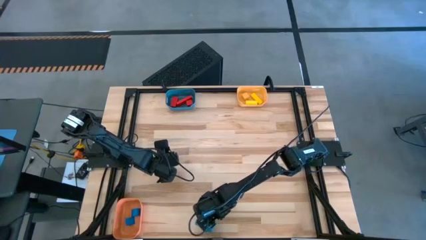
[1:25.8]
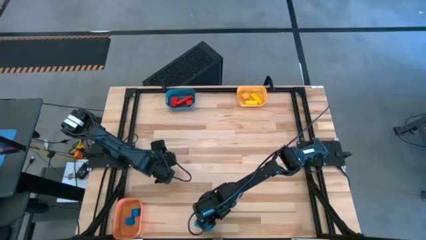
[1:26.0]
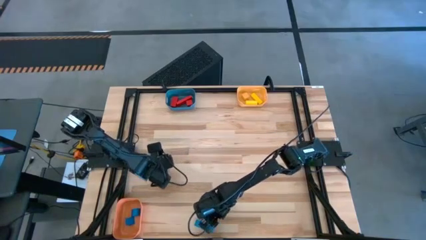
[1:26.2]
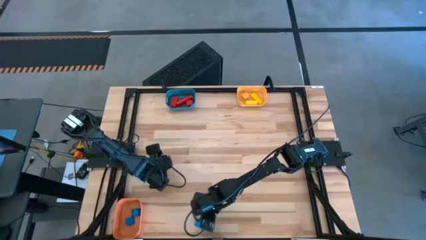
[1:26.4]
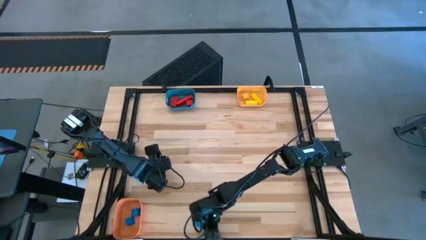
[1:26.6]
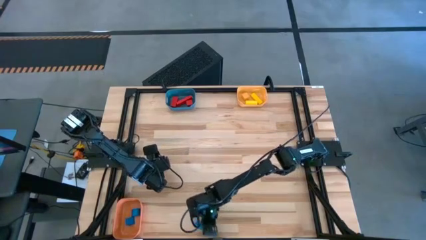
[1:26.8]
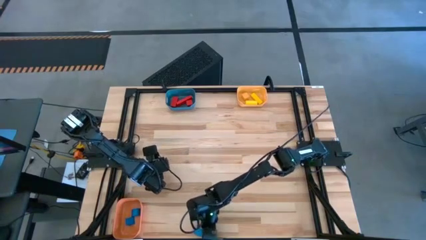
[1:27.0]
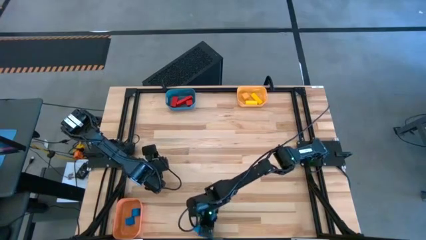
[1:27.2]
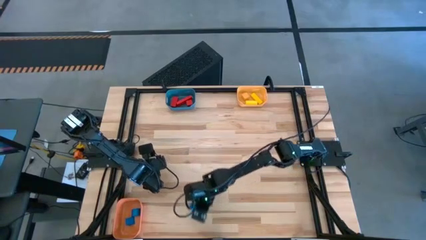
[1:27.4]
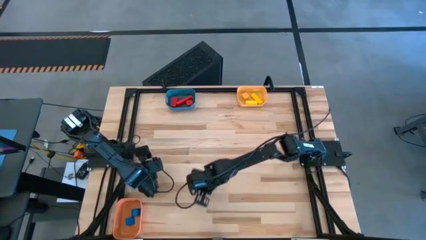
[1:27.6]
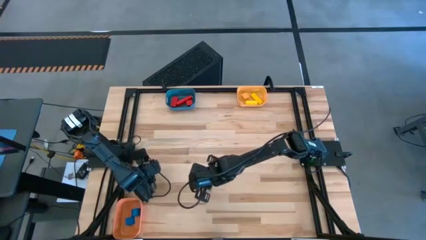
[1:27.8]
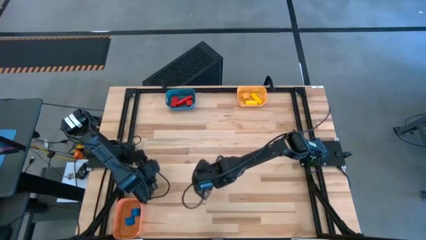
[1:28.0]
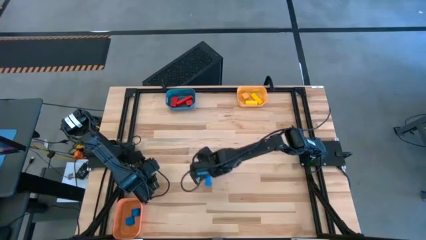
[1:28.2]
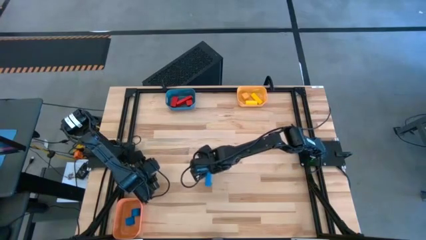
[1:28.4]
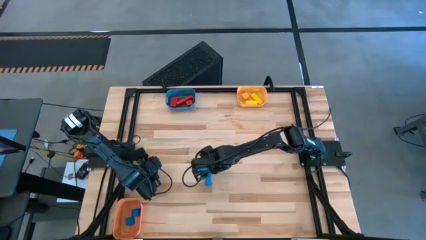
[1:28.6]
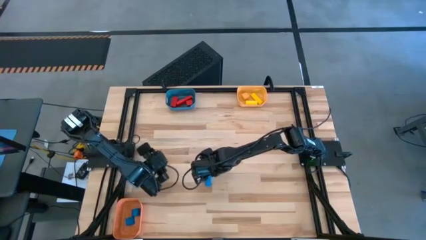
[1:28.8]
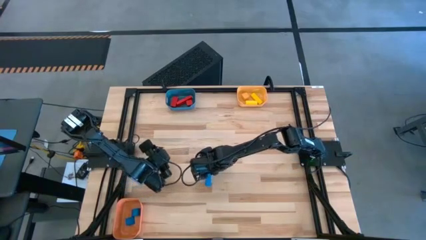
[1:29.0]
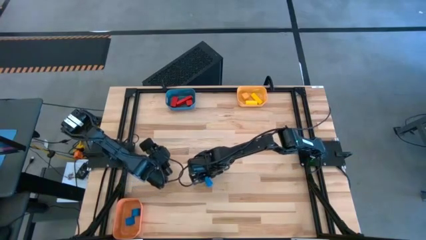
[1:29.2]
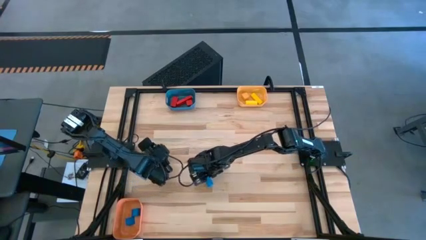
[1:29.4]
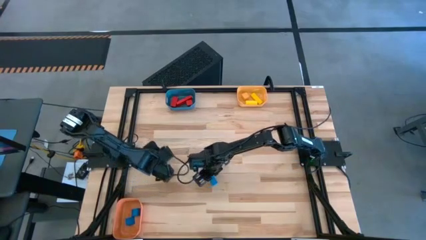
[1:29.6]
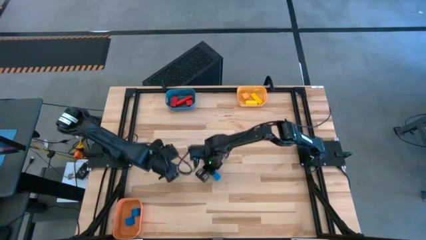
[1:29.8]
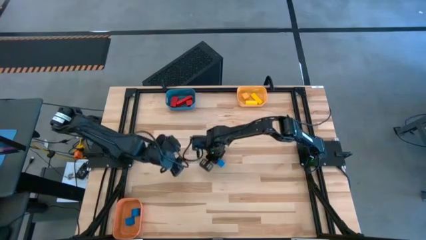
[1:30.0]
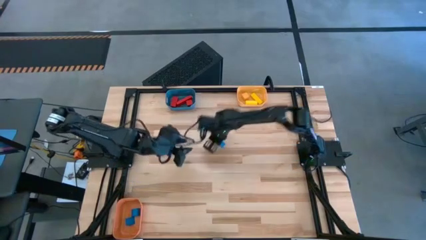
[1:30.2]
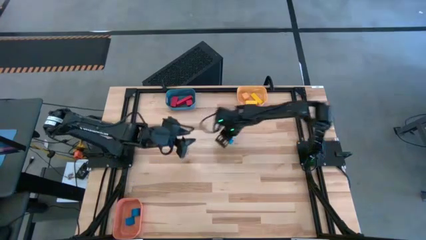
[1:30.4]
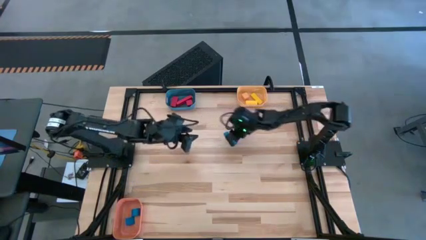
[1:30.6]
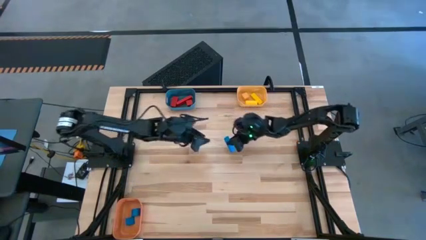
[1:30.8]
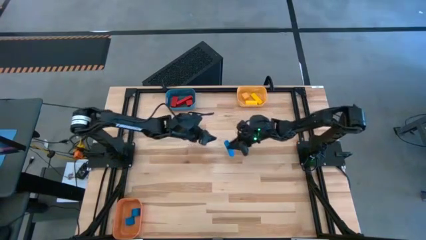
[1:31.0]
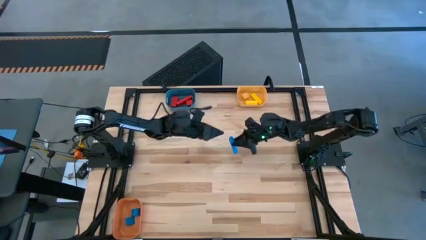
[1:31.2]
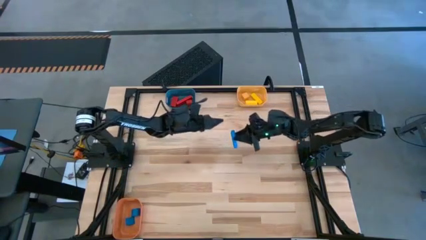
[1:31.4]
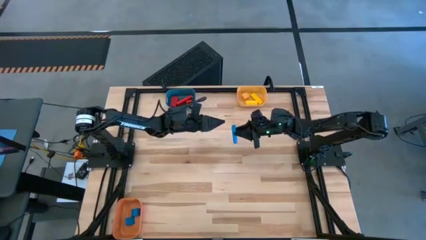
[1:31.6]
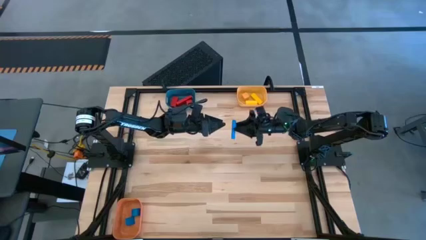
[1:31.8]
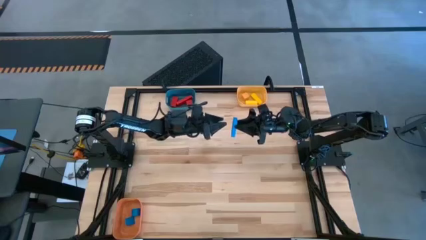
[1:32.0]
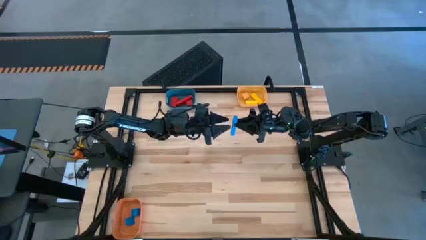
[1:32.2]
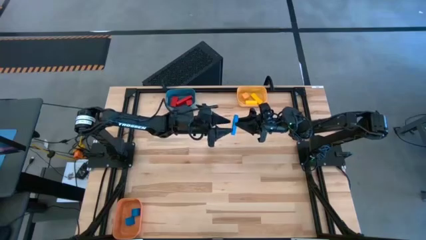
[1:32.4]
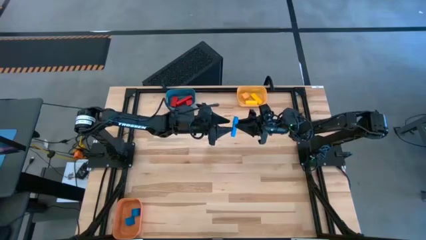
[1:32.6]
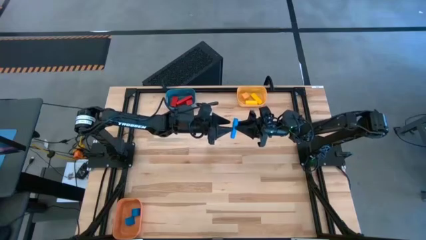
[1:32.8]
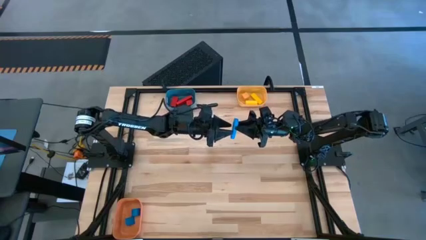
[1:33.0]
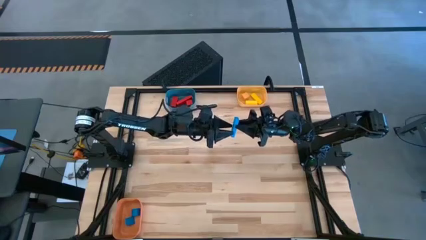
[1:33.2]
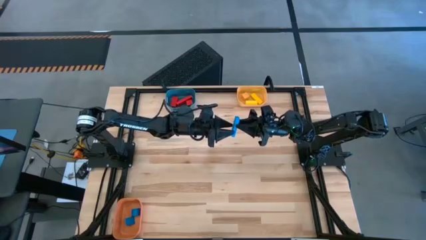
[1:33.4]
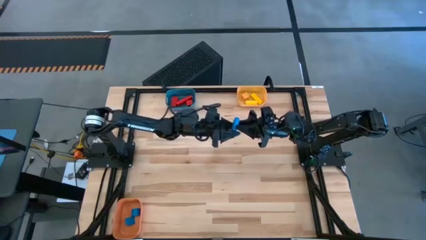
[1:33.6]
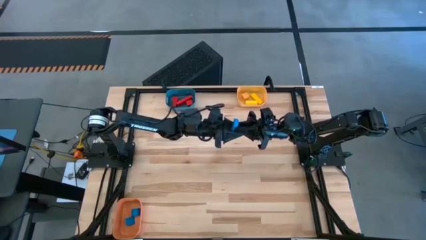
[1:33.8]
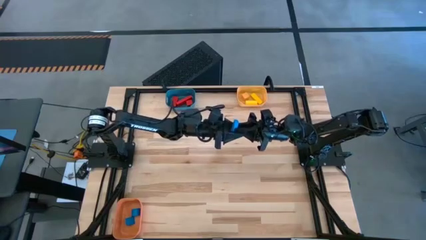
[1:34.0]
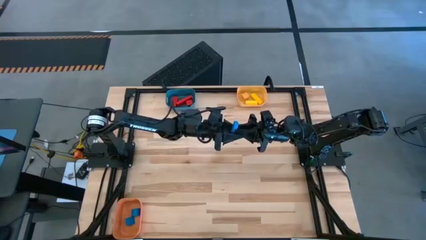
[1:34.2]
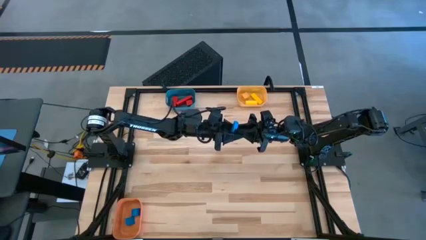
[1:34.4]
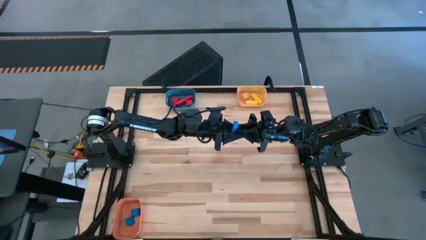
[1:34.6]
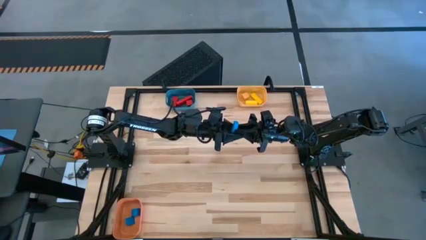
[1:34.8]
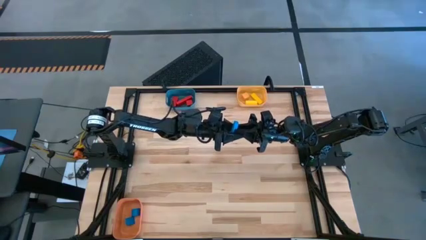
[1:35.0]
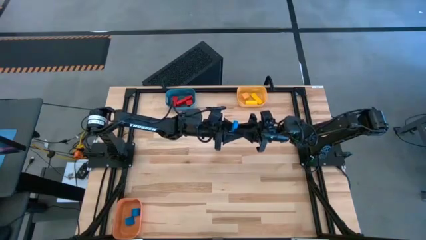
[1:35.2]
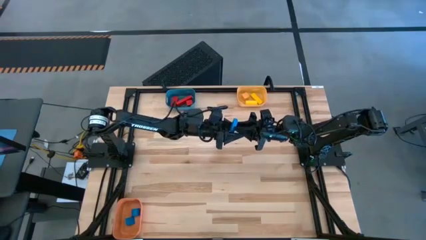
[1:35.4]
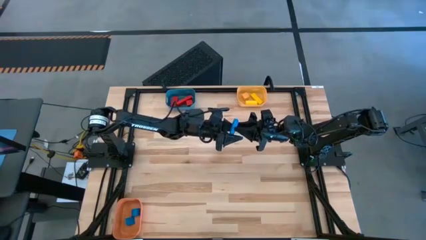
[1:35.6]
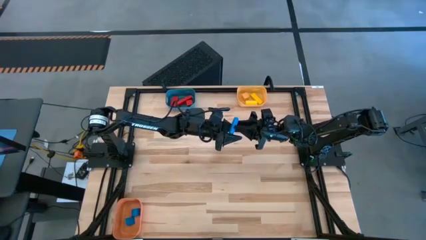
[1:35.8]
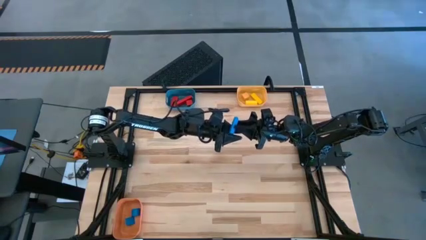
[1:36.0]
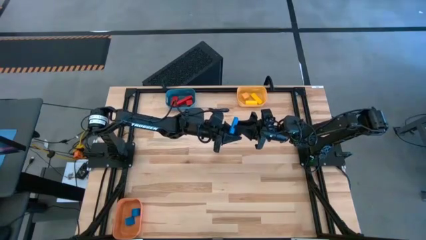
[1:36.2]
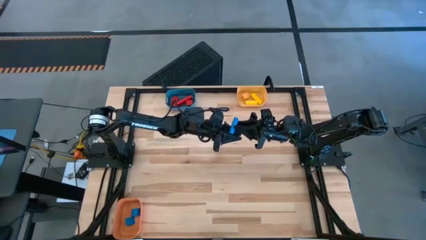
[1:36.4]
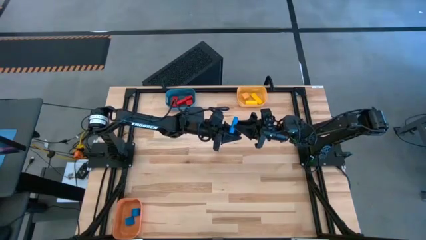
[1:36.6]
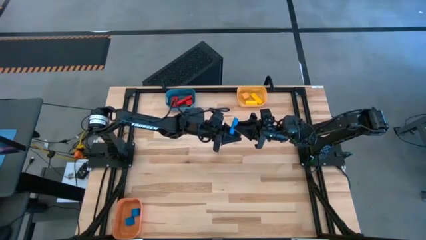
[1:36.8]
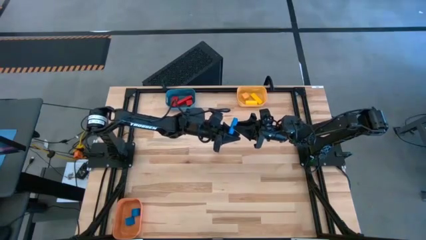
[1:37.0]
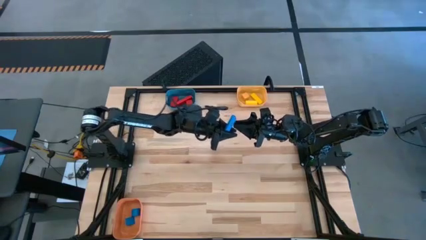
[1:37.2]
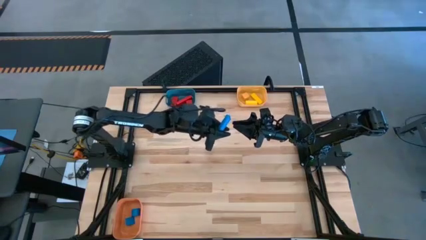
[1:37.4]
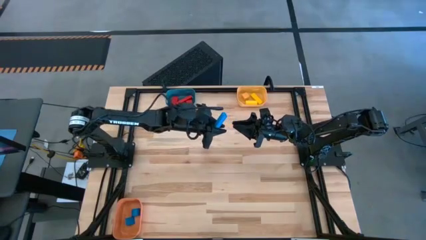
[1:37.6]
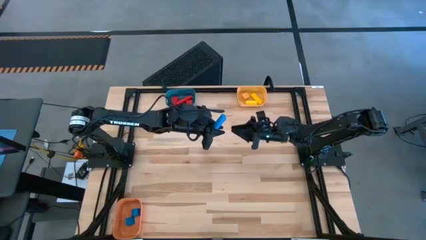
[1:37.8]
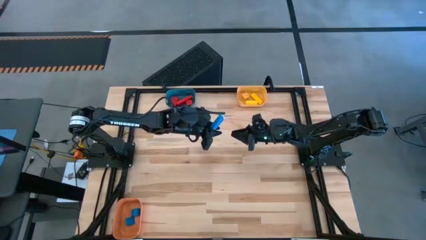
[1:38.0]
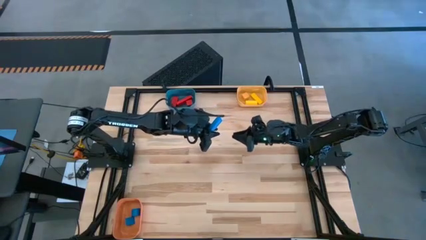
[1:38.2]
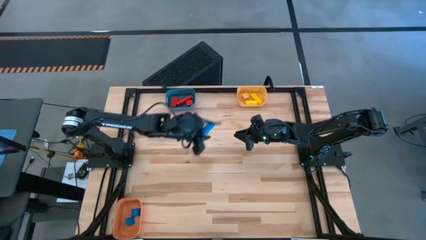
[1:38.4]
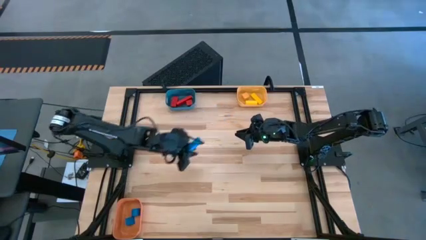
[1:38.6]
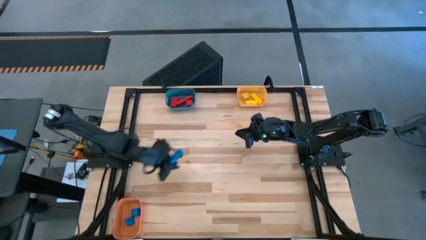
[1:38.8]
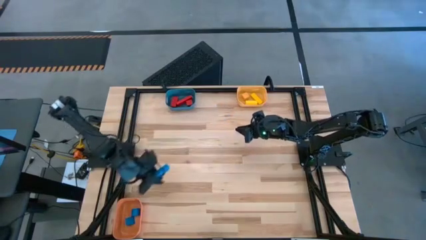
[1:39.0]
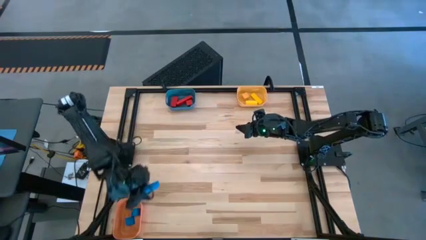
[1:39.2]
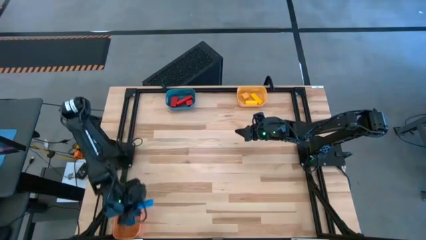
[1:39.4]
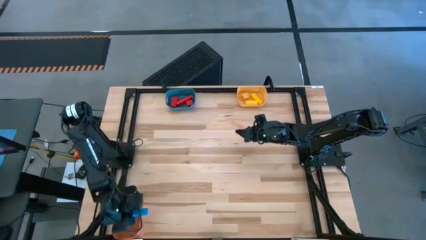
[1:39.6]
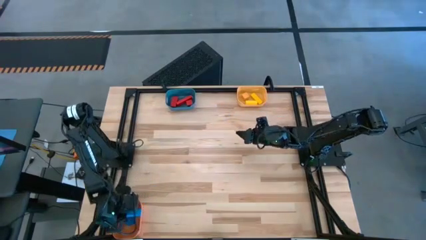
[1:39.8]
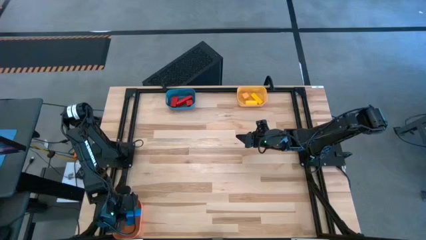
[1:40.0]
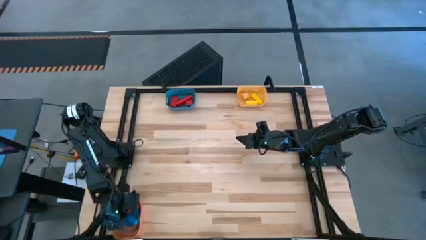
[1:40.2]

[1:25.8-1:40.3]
Task: Sort & place blocks by color
Put the blue block into the orange bin

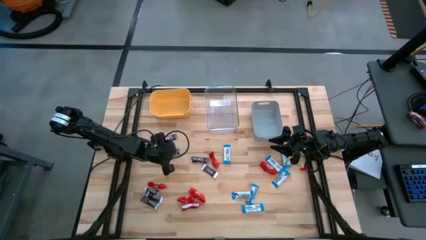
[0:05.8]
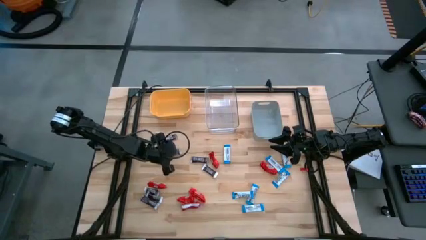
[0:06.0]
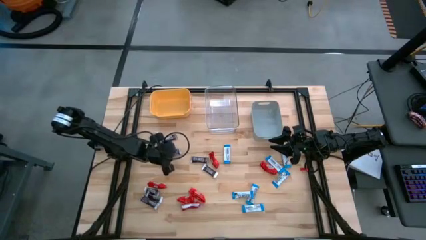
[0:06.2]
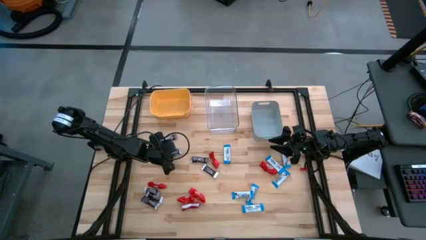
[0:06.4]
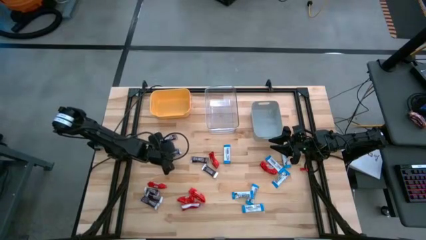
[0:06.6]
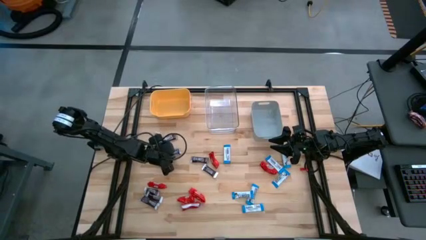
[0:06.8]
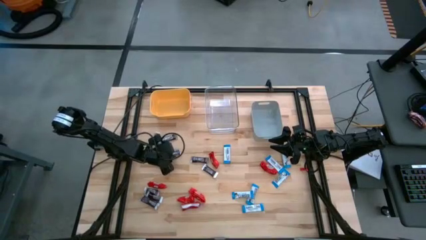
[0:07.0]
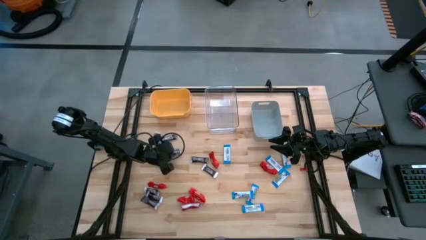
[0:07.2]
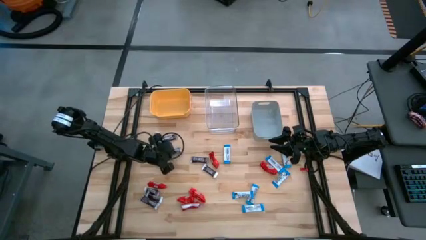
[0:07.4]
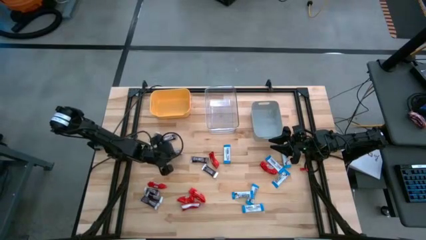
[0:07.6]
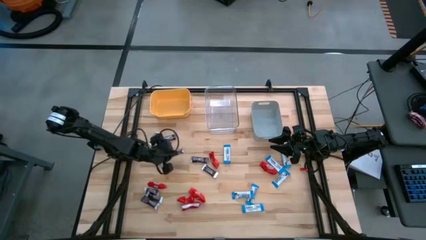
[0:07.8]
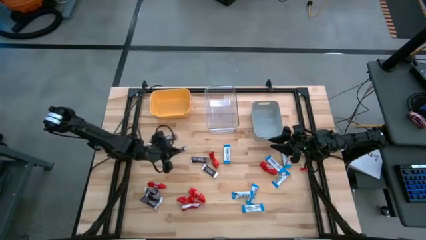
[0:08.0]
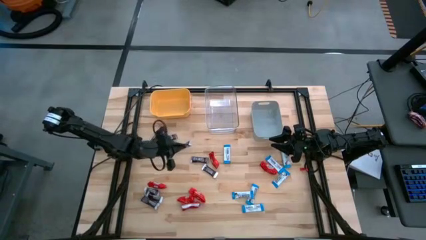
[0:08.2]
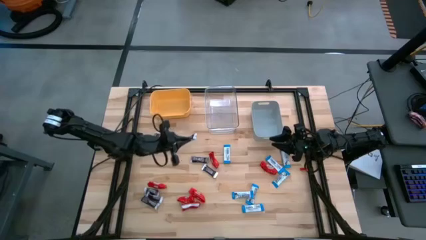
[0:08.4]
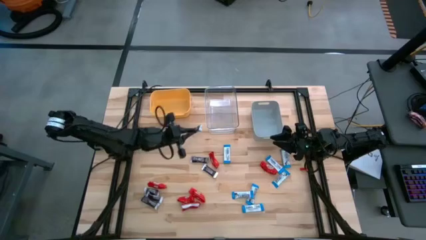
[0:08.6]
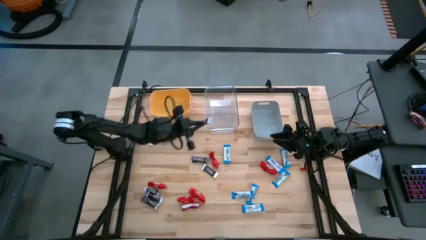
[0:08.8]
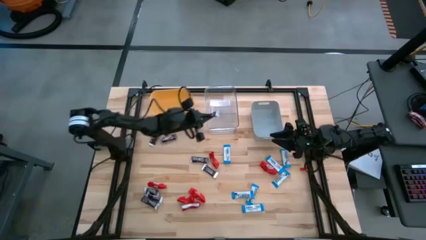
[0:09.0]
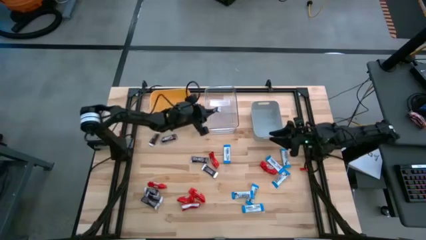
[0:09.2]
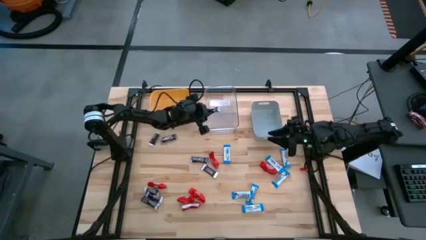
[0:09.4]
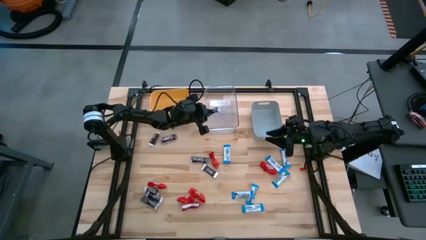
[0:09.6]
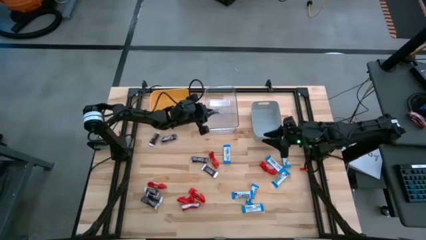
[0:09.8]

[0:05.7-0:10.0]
Task: Sort candy
Put the brown chocolate into the transparent bin
